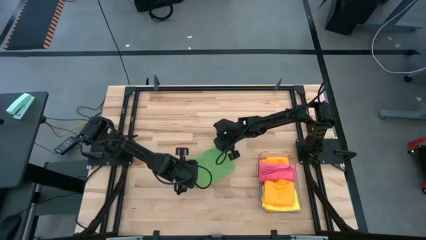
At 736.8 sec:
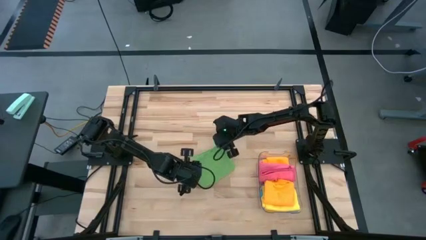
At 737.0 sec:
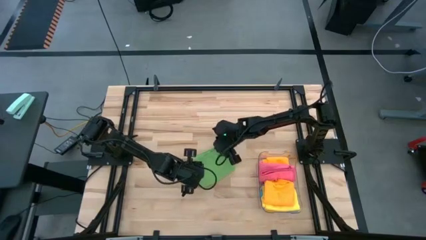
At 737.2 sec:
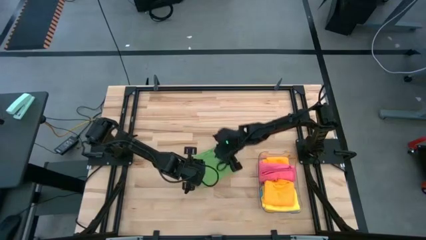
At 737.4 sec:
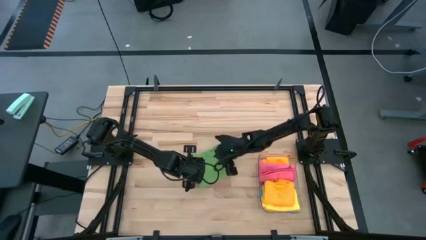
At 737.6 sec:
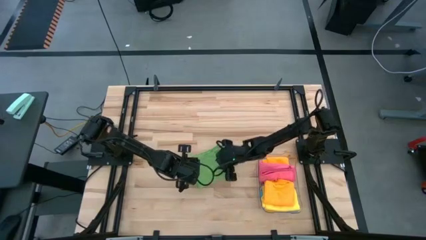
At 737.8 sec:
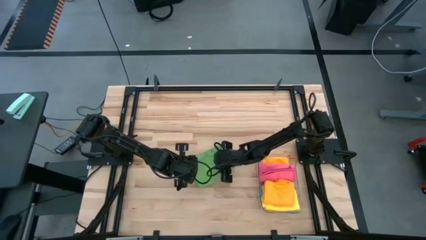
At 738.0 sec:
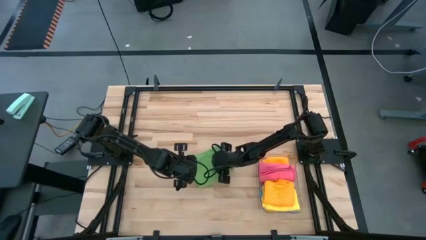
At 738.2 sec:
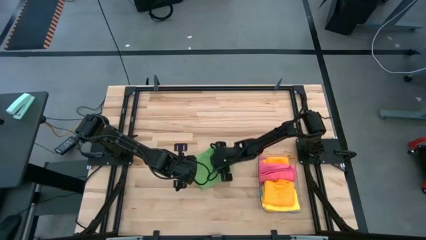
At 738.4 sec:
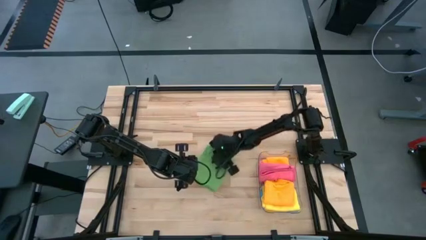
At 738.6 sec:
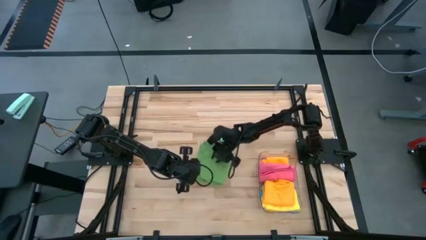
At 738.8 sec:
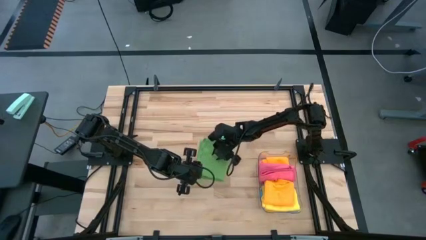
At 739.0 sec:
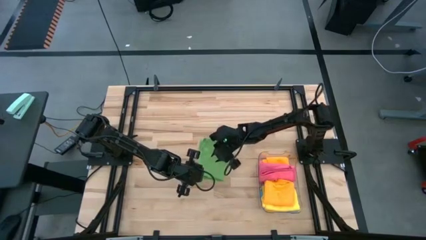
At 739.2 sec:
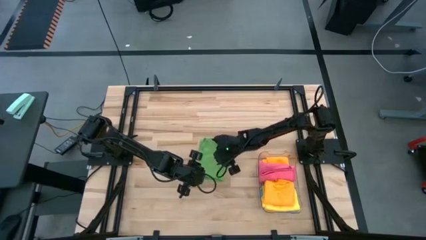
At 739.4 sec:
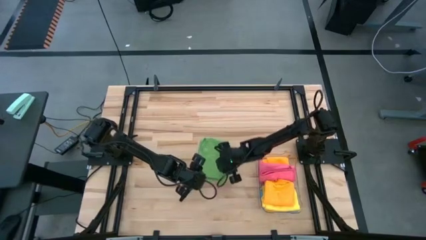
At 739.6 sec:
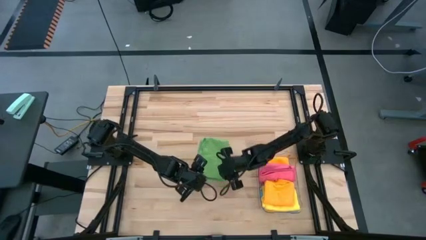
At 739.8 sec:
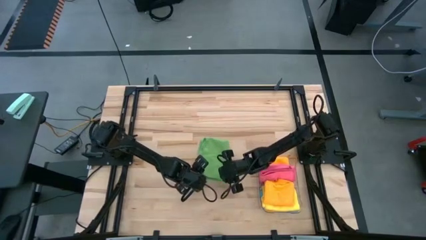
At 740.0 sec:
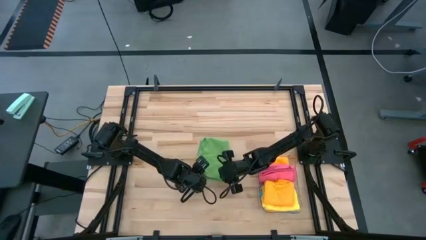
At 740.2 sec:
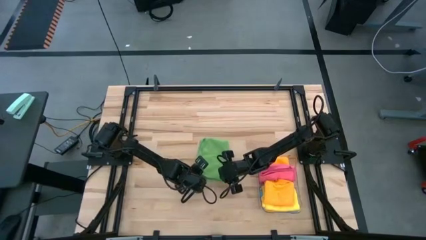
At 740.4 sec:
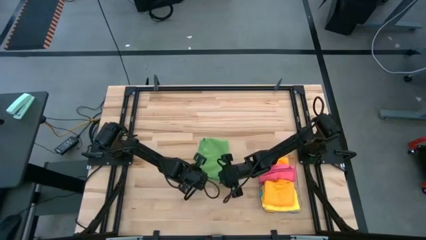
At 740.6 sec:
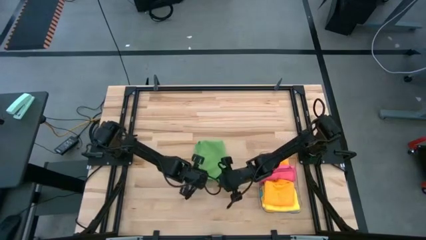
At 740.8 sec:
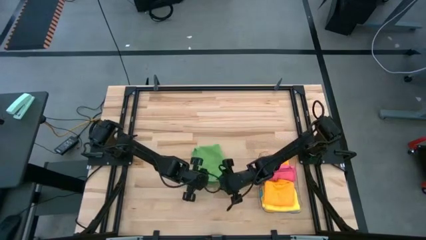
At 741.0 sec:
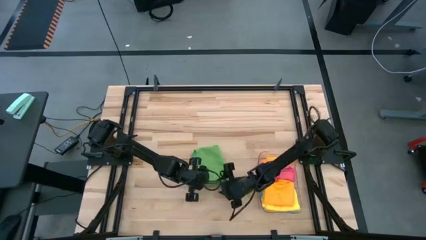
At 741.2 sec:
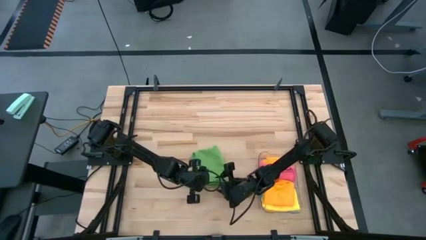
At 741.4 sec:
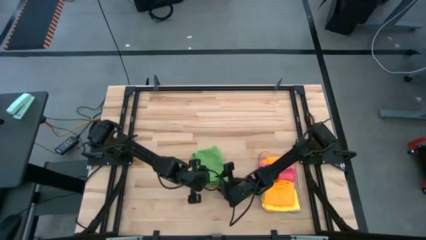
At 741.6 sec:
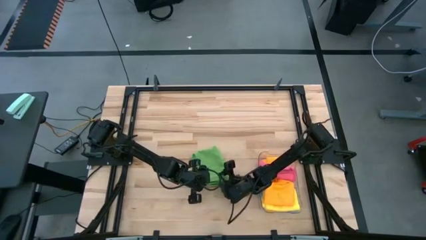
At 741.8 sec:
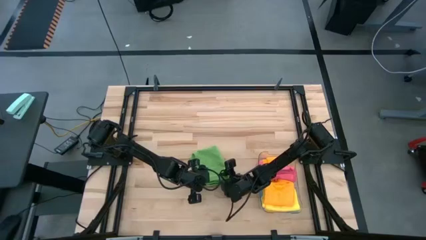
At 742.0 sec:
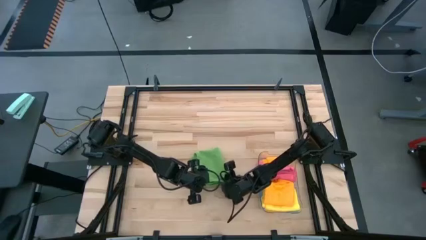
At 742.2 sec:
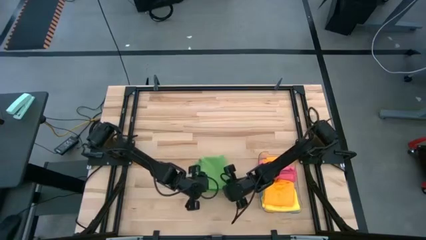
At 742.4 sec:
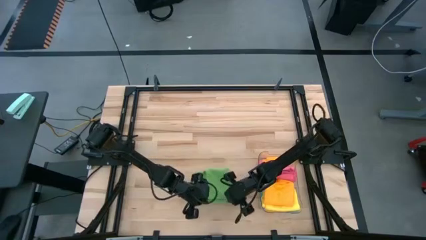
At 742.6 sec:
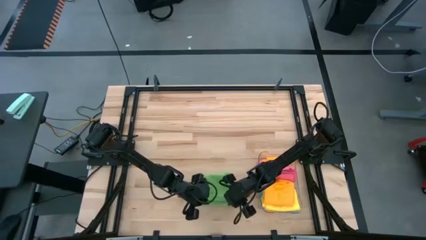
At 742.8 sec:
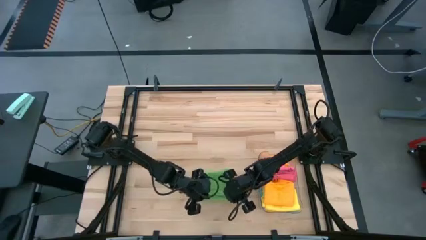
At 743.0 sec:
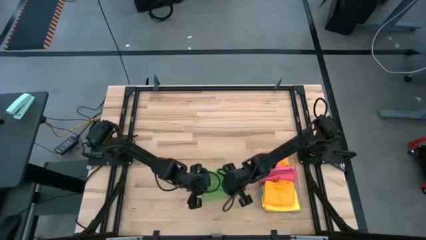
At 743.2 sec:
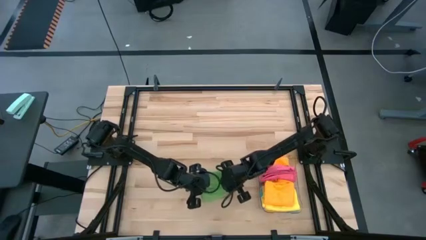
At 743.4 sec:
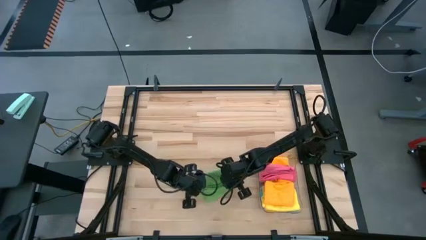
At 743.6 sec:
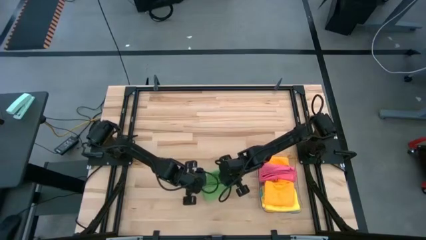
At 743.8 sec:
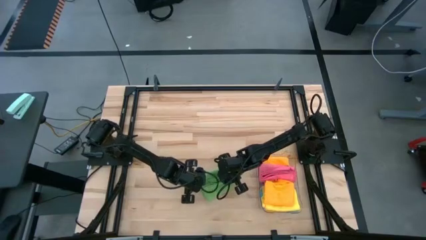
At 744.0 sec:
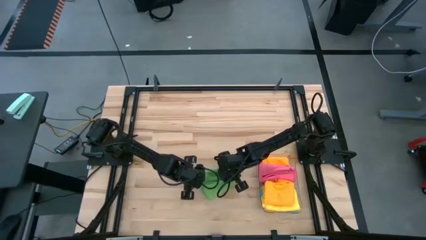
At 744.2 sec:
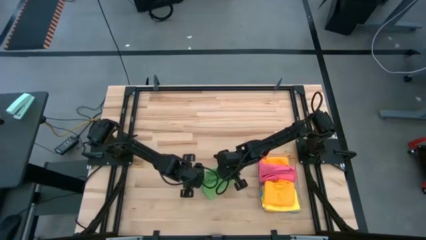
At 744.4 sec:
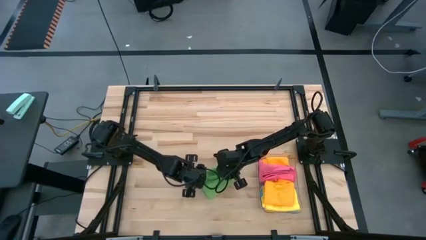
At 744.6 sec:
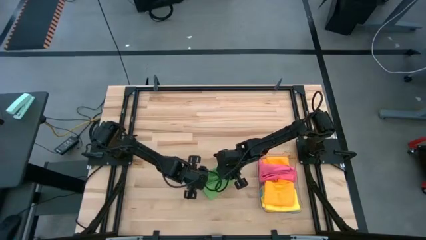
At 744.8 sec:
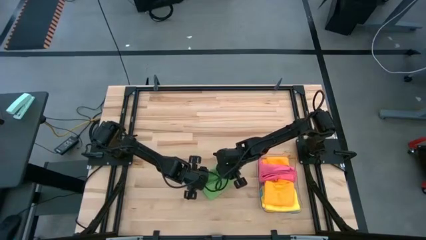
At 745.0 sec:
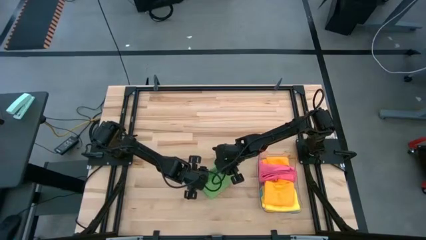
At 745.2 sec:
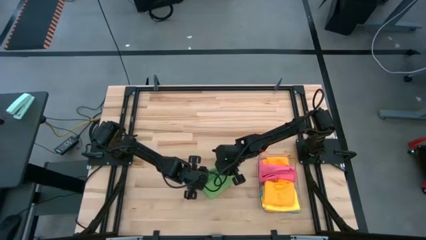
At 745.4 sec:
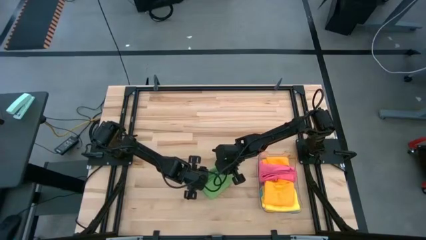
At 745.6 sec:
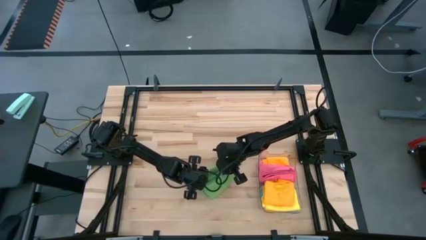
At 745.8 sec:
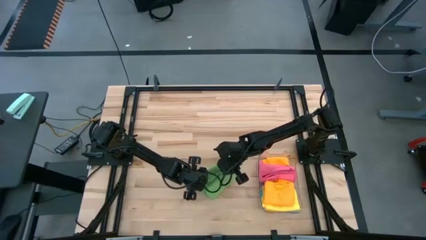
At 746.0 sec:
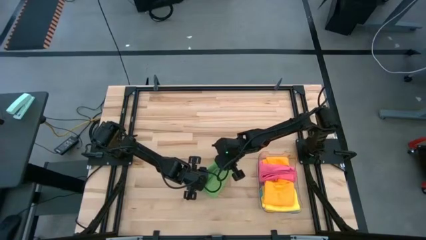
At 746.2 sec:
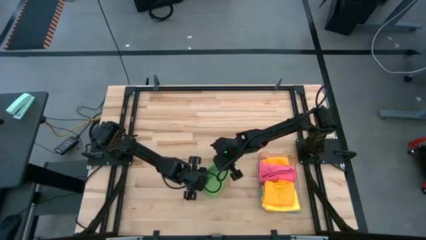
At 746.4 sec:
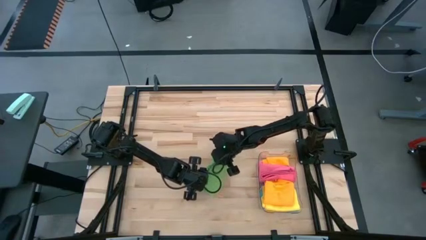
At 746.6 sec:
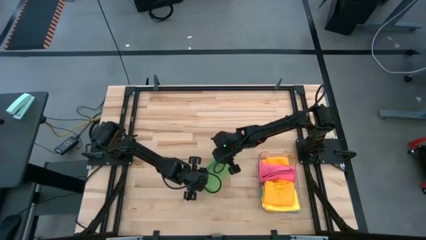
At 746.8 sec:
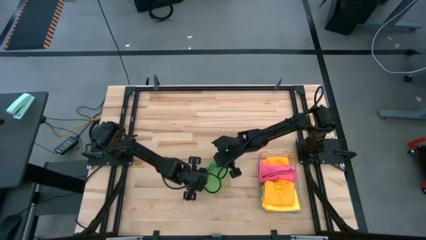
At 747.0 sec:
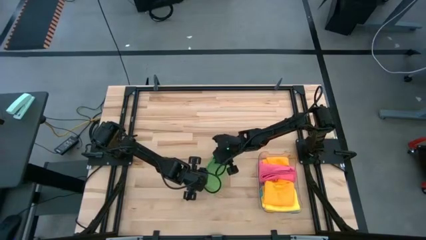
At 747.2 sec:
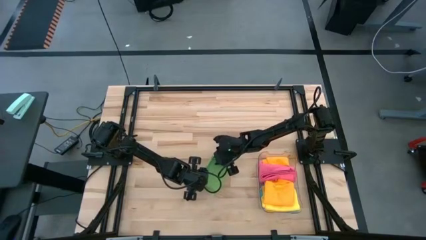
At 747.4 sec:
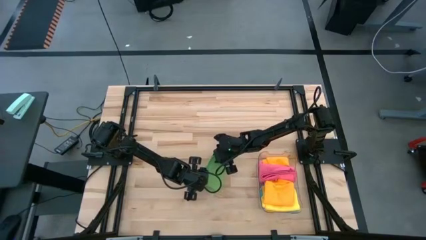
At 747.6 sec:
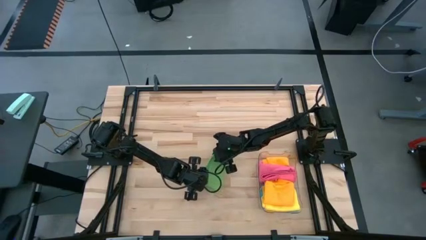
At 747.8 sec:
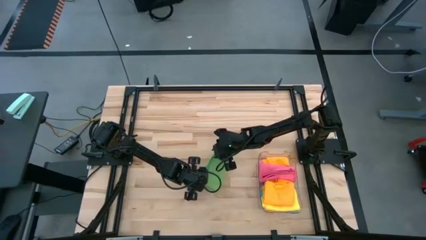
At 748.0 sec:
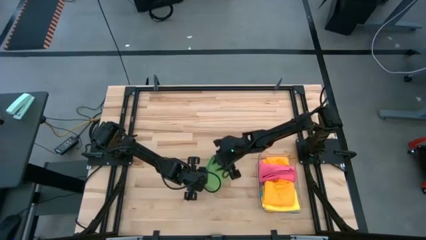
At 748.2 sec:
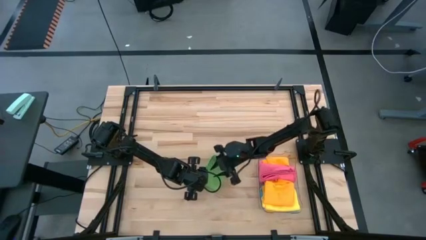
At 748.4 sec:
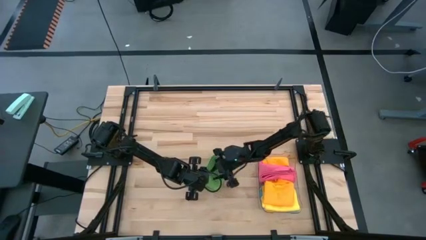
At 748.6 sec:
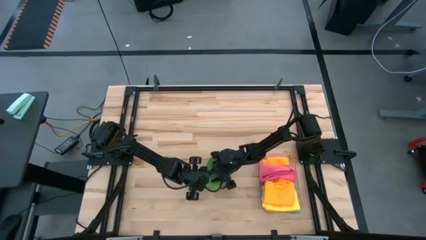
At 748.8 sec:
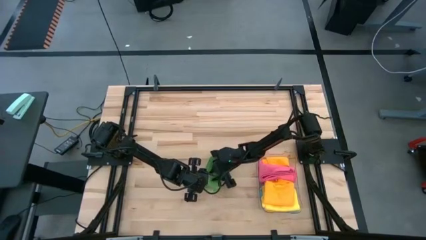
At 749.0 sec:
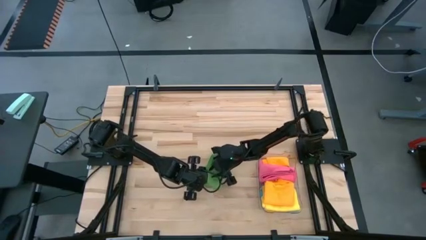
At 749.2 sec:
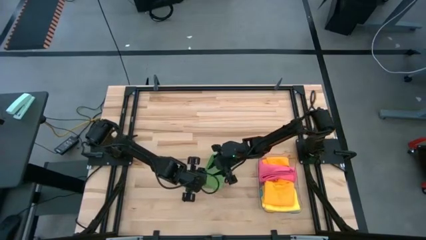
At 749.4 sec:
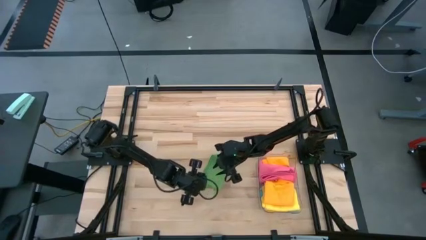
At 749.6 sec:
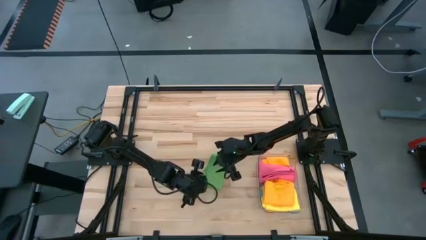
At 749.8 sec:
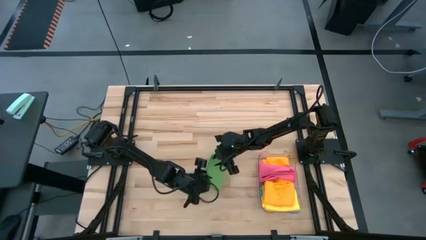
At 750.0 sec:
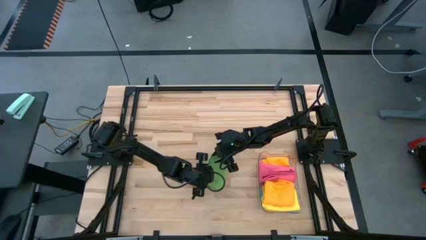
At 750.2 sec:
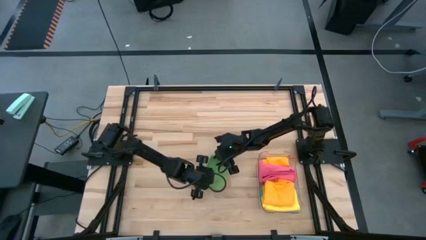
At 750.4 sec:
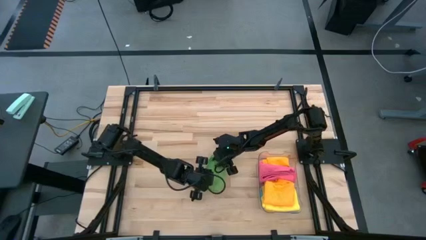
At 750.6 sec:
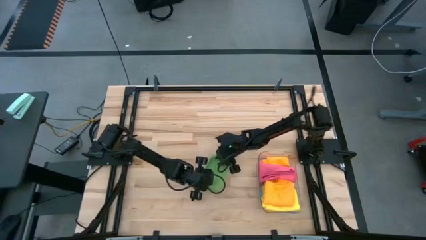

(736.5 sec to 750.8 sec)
Task: Fold microfiber towels
Fold the green towel

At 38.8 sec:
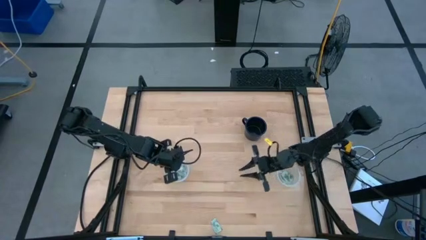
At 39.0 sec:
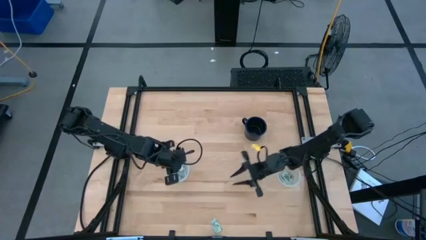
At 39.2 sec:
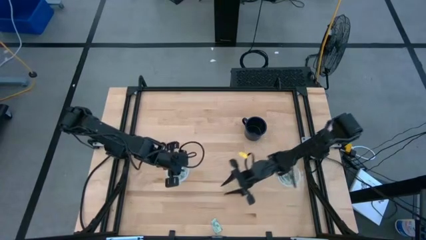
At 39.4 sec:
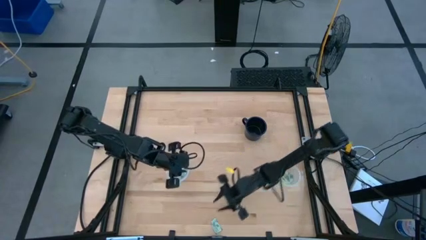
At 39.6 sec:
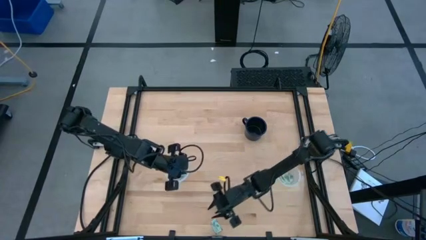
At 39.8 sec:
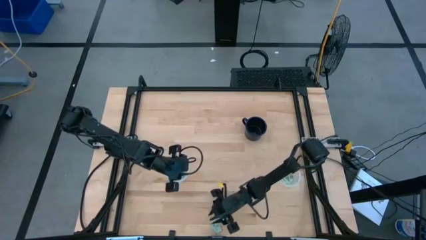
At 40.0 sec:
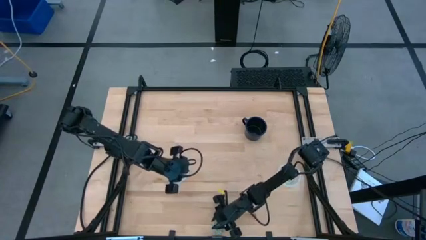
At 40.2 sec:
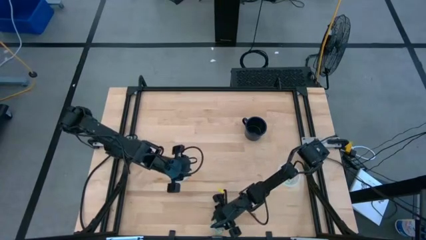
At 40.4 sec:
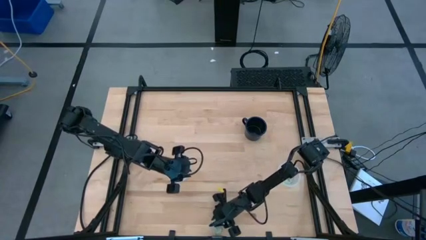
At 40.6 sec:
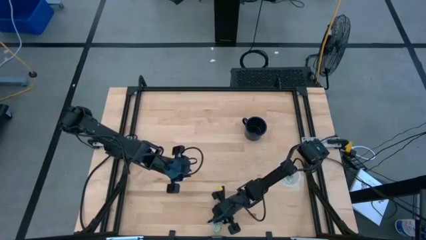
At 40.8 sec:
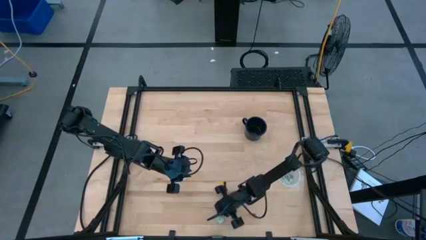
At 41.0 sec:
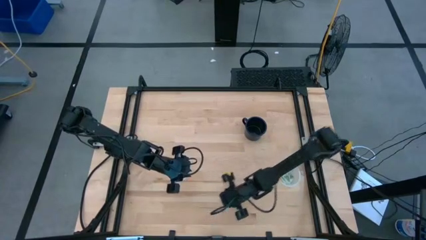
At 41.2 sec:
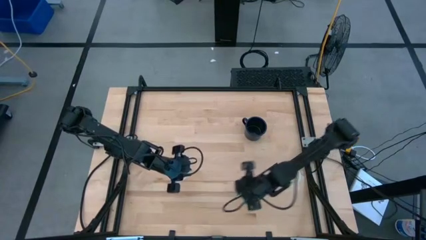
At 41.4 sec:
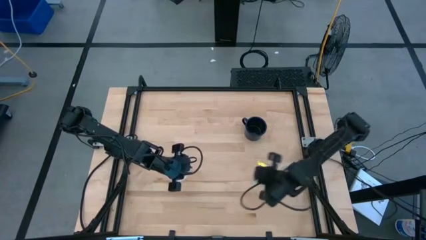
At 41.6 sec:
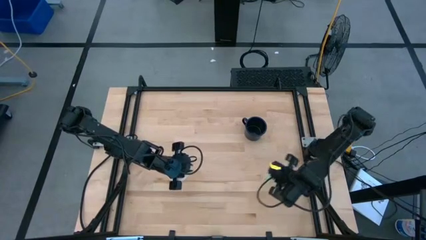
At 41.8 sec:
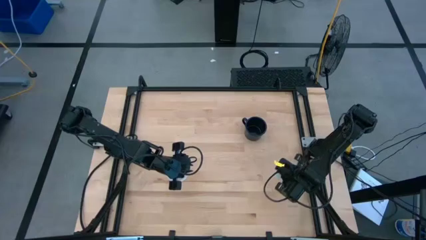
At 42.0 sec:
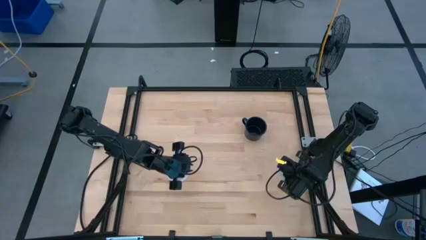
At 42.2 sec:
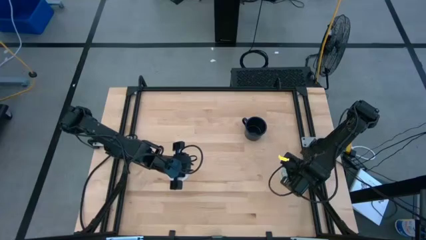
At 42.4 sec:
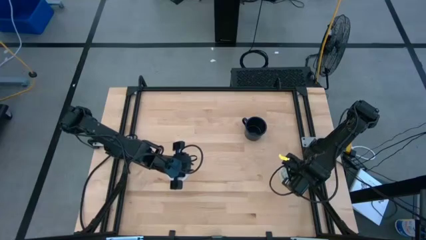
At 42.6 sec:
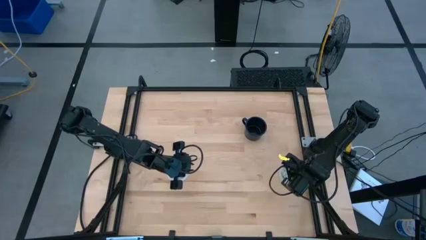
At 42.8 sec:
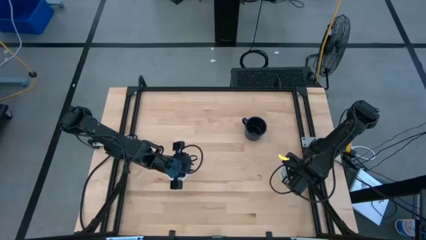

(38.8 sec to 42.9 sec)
Task: Pick and place Stevia / Truvia into bins
Put the stevia packet into the right transparent plastic container
